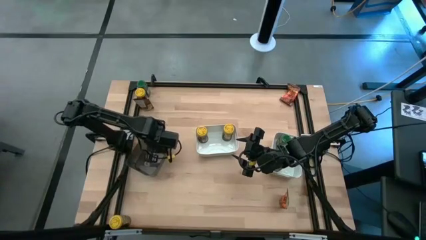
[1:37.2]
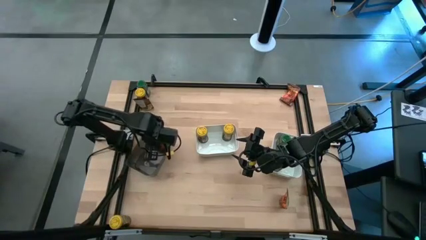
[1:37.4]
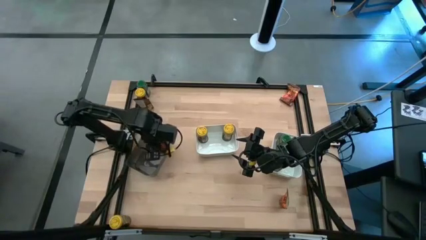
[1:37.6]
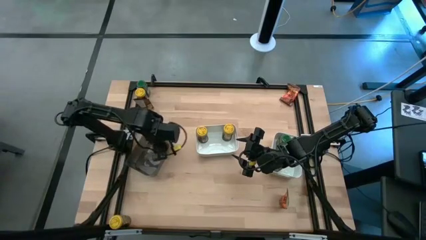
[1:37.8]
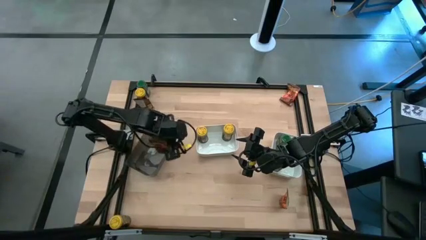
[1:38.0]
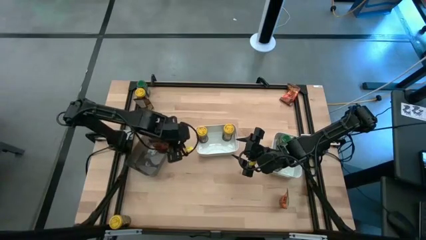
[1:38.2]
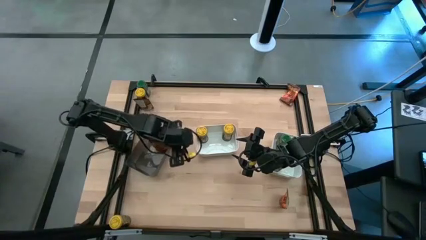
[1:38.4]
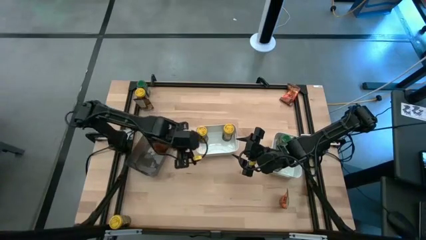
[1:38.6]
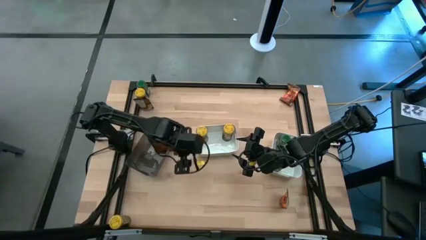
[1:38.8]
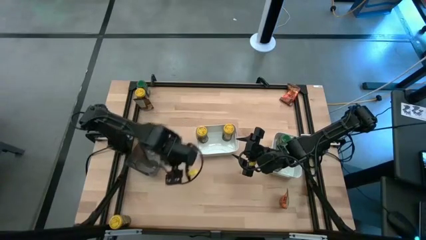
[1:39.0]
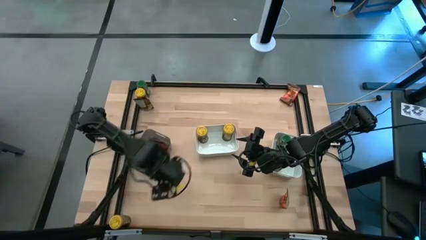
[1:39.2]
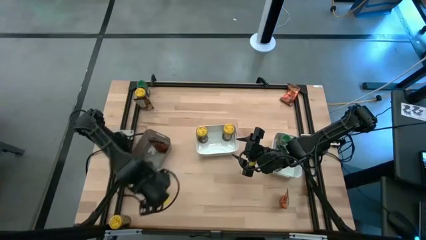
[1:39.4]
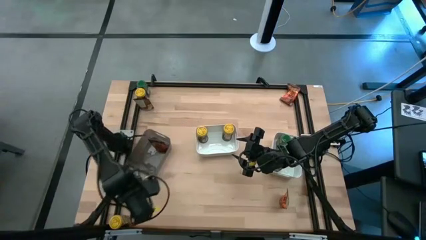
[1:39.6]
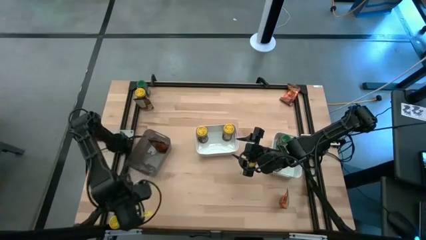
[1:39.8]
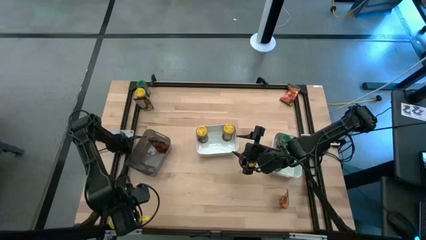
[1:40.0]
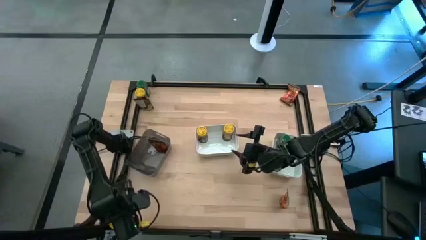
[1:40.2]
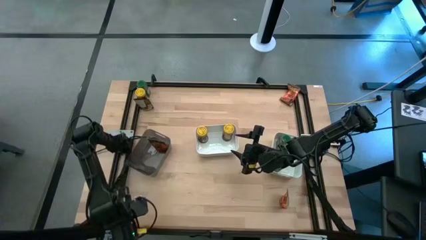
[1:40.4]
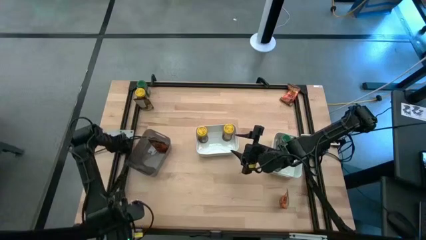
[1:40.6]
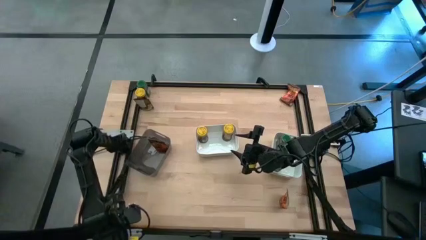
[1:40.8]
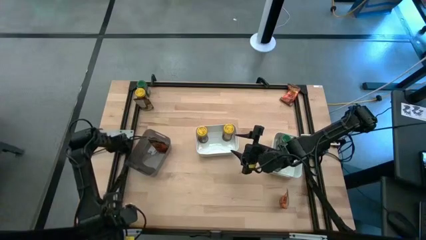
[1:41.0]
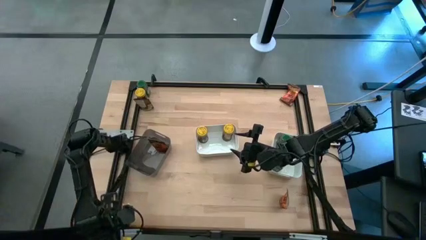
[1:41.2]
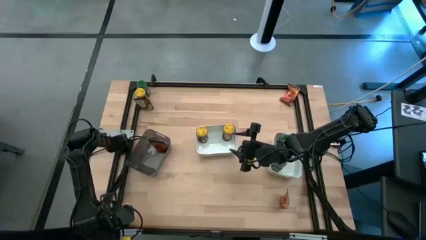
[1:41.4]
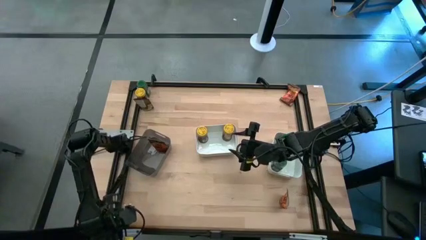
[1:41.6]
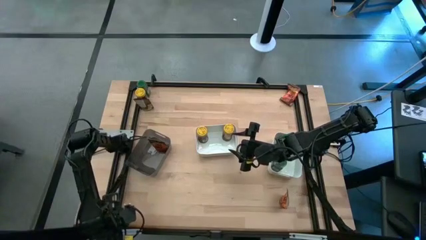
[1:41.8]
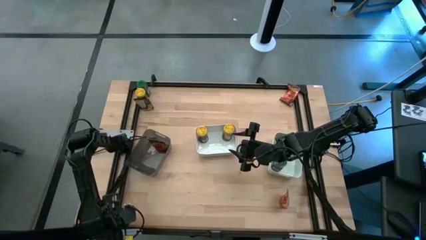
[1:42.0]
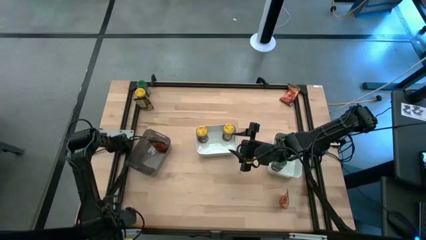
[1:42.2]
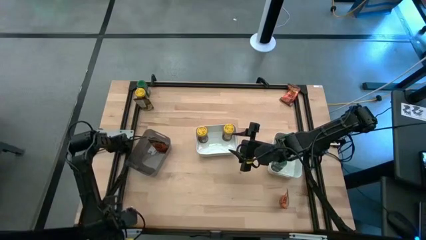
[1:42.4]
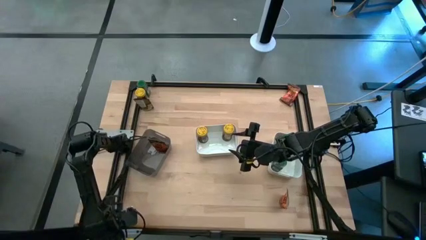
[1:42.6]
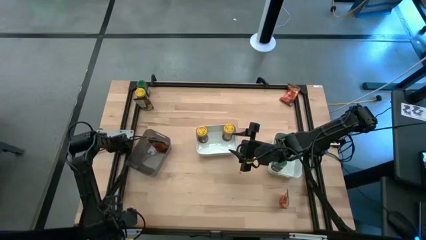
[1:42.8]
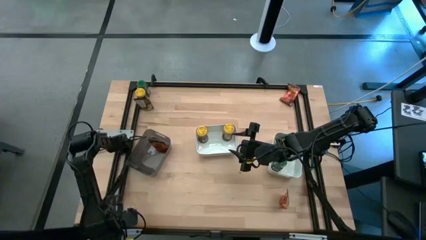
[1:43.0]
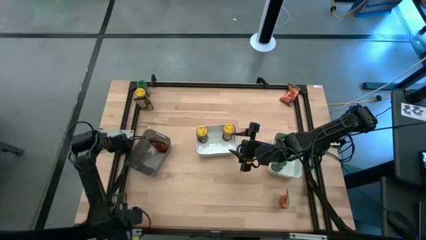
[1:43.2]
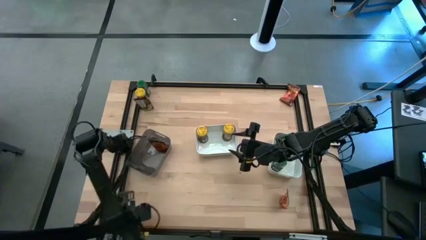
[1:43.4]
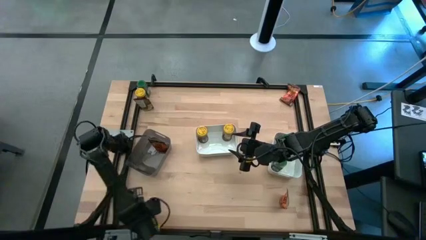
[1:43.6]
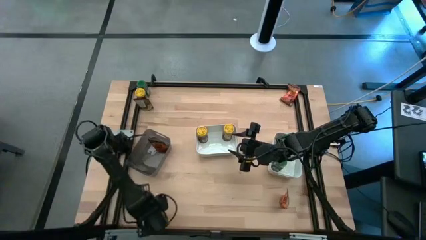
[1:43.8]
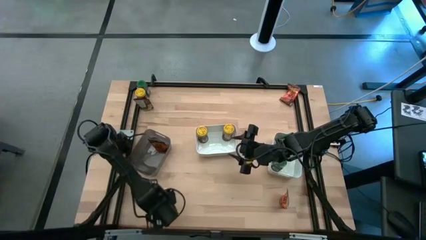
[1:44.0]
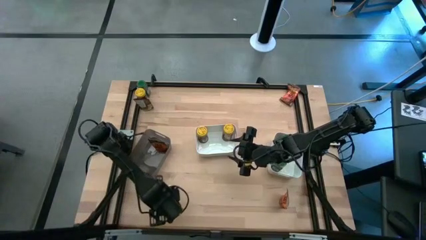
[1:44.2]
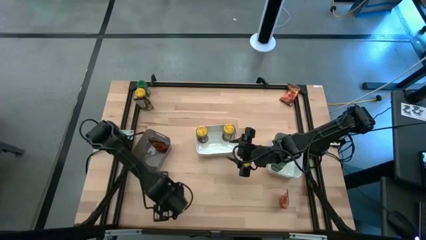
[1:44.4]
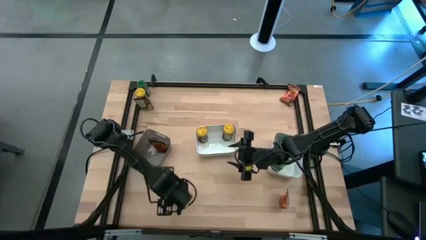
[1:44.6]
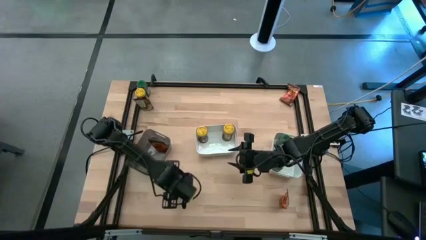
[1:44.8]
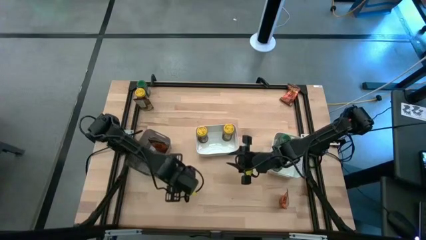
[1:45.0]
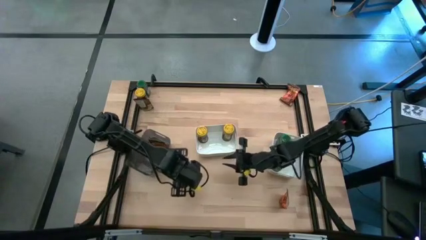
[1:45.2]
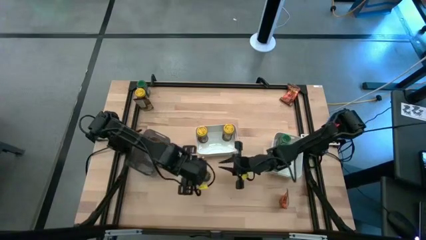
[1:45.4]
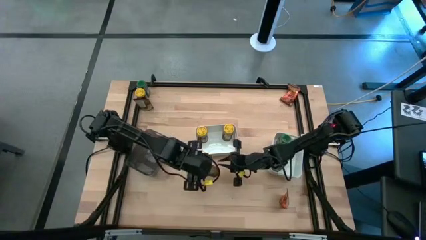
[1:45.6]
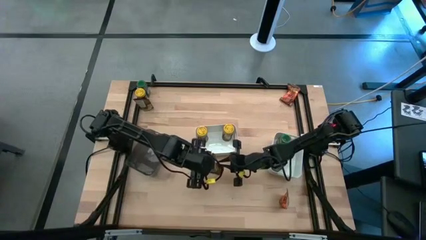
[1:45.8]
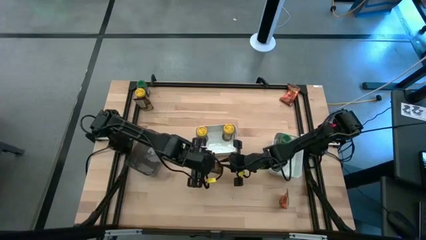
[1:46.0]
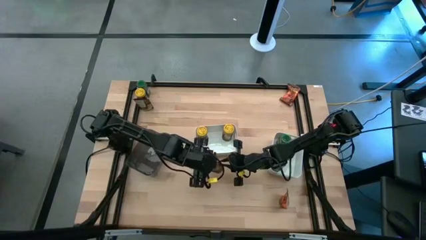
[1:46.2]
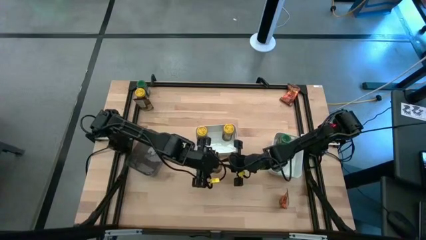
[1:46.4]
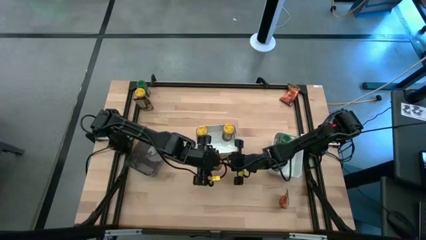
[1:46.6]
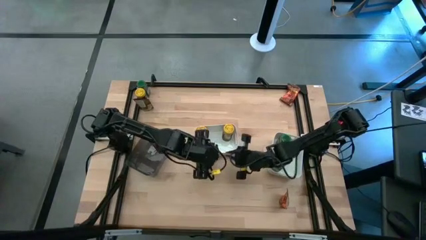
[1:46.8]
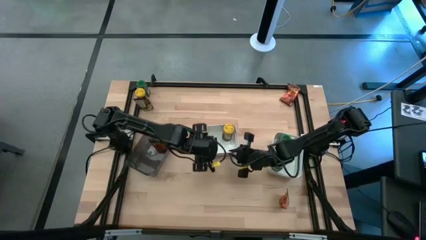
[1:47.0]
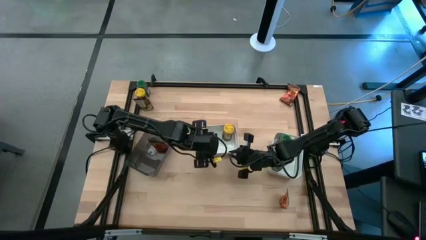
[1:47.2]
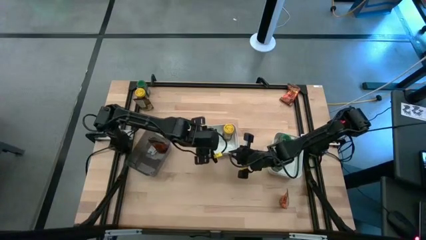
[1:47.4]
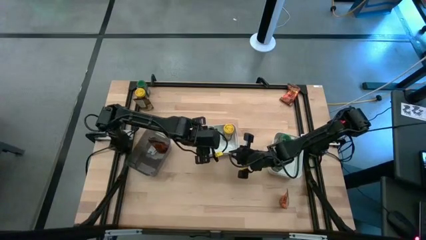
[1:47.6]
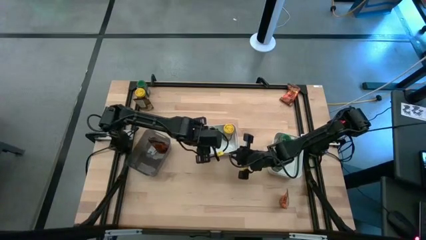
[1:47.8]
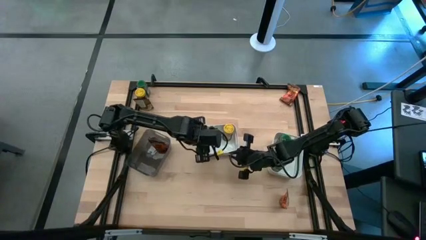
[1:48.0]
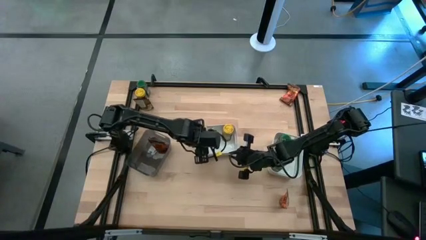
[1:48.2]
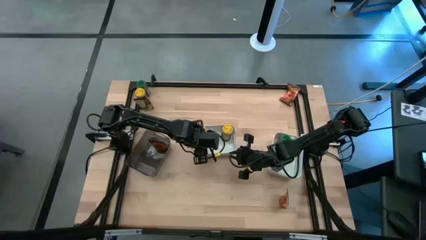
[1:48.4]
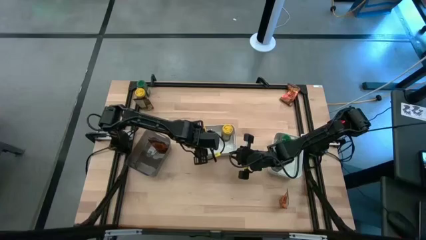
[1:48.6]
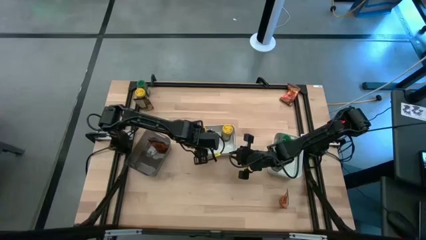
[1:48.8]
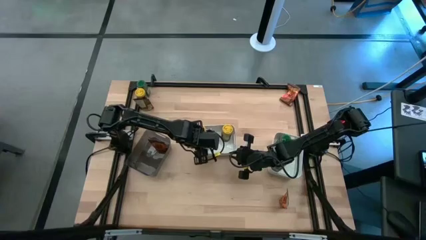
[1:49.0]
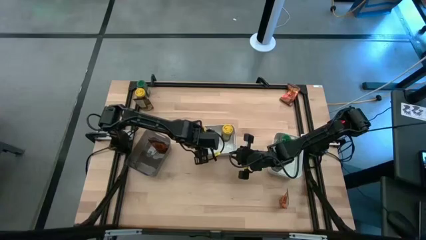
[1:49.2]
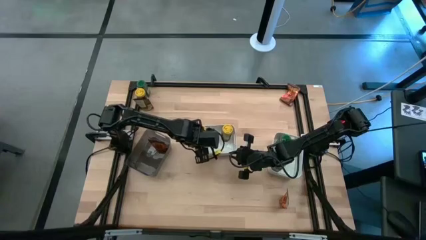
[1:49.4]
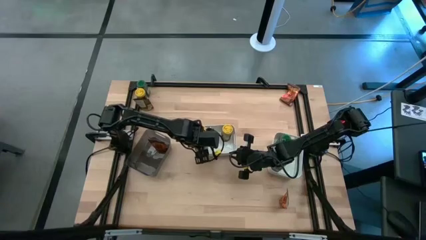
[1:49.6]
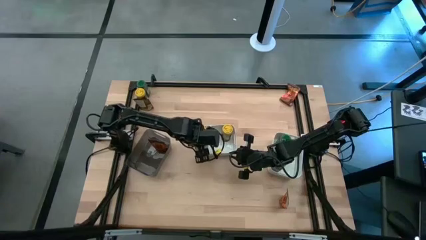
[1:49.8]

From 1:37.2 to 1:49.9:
Task: Sort spices by type
Put the bottom yellow seasoning bottle into the left white bin

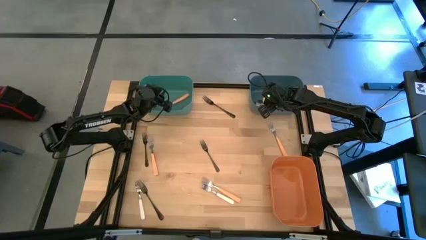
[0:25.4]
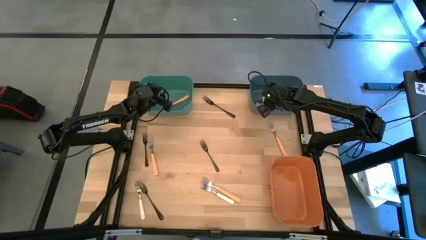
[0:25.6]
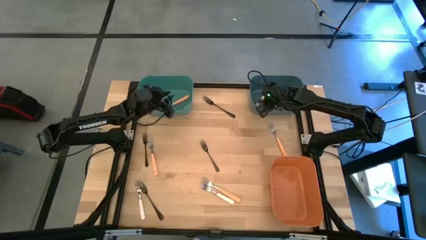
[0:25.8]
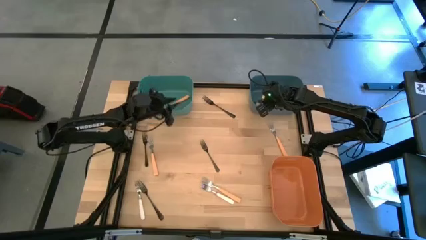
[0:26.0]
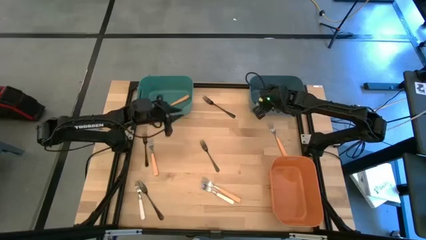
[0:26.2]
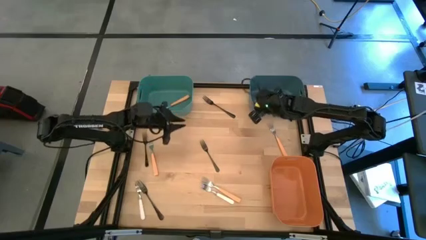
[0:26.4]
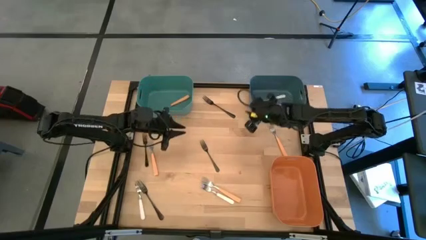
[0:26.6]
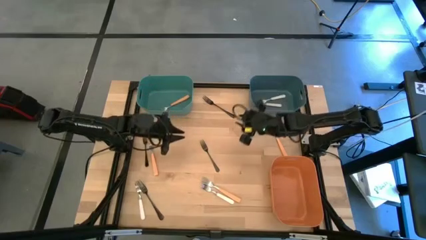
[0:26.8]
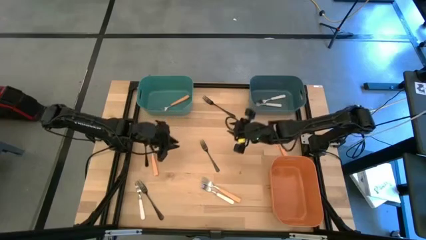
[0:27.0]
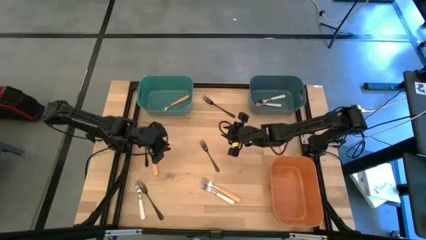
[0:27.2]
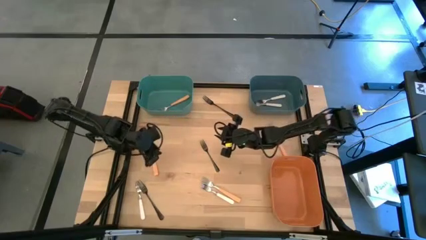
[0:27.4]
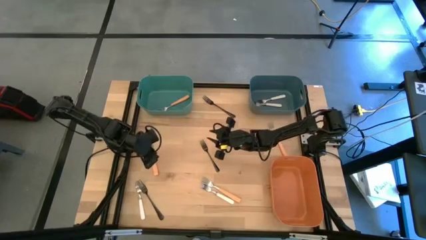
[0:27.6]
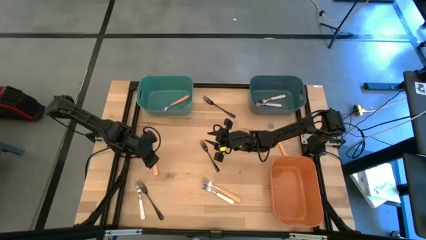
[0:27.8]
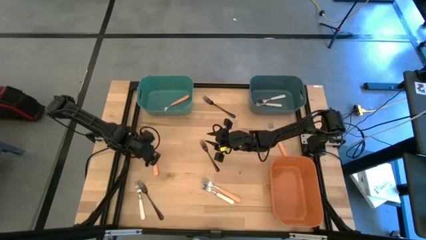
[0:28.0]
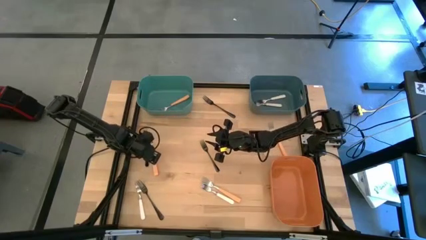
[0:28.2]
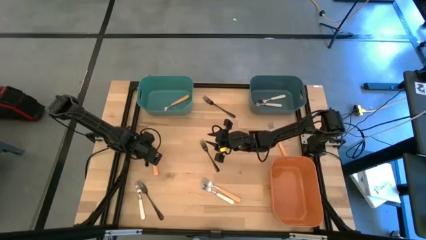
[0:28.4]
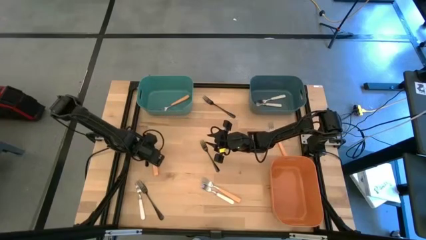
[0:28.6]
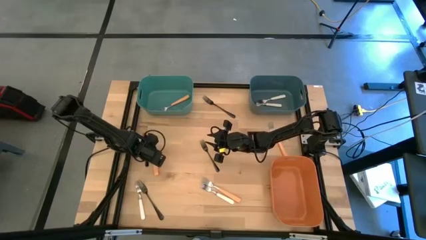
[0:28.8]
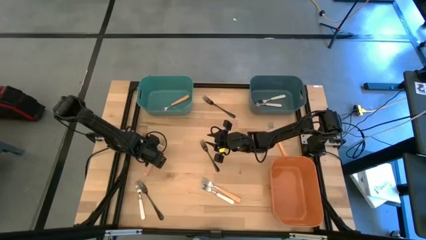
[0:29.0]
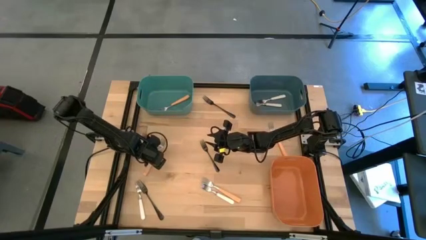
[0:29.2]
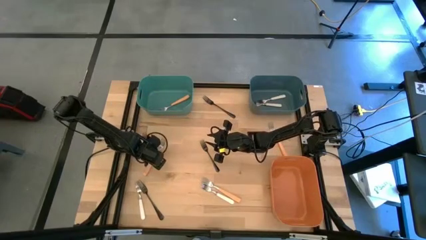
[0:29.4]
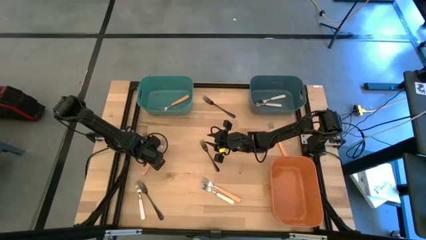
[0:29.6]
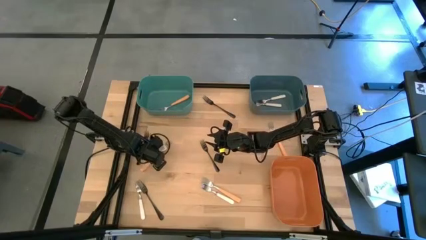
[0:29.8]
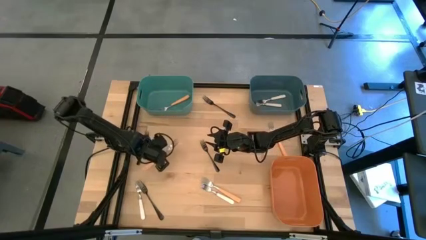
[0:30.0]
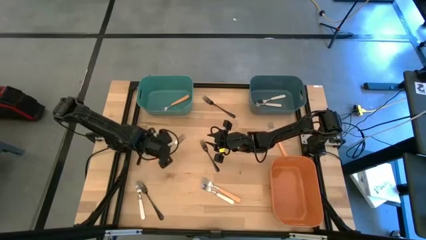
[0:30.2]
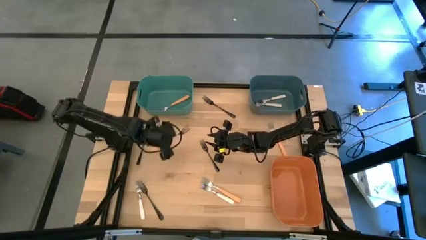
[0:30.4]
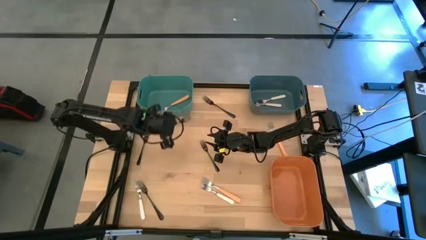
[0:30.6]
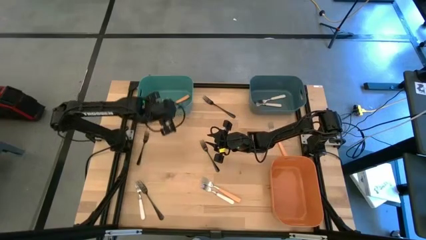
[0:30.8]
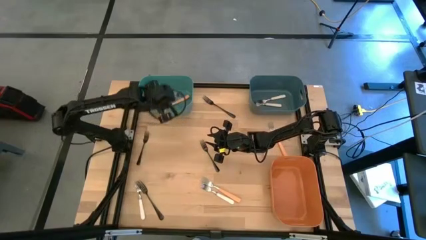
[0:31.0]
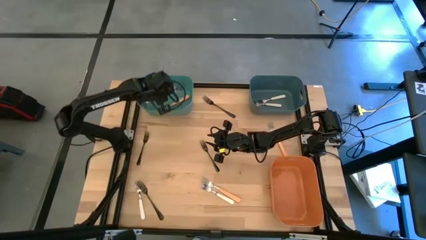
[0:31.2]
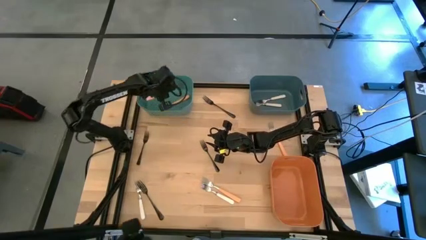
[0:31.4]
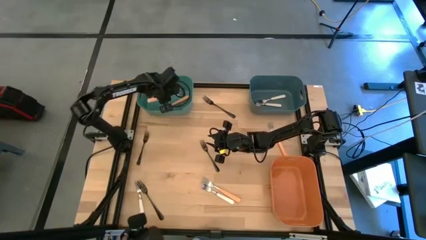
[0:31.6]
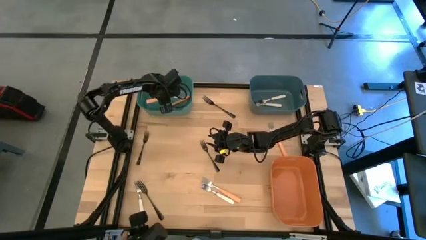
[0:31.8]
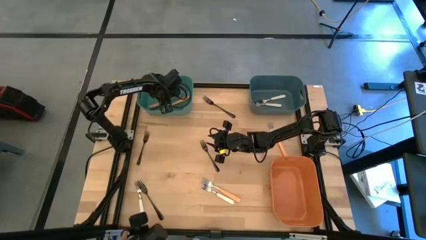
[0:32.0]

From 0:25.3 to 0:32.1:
Task: Sort silverware by color (type)
Put the browm fork into the green bin
